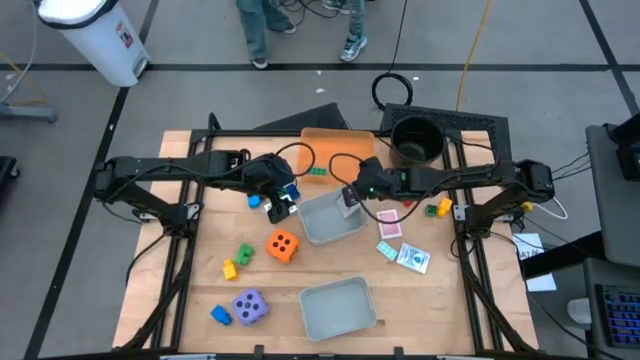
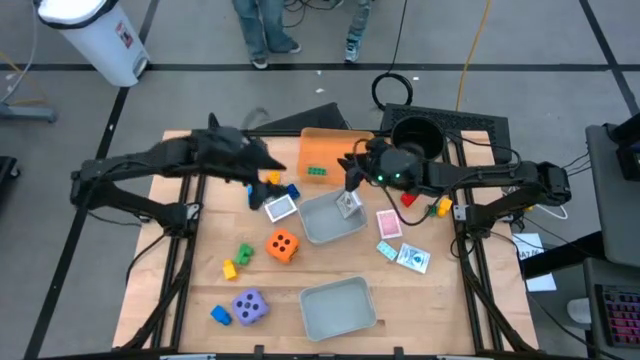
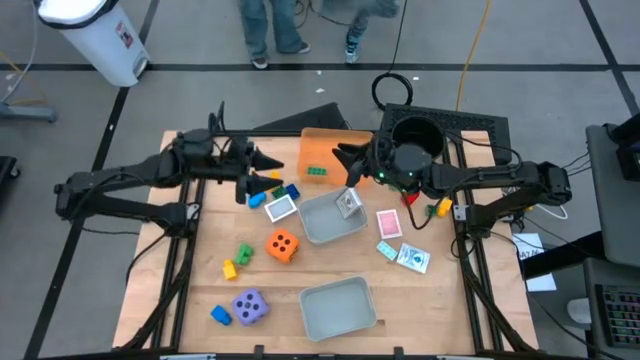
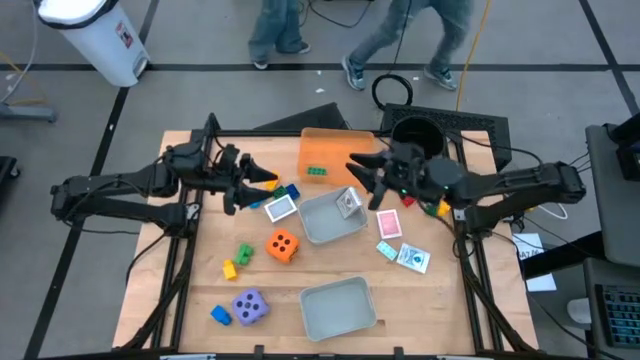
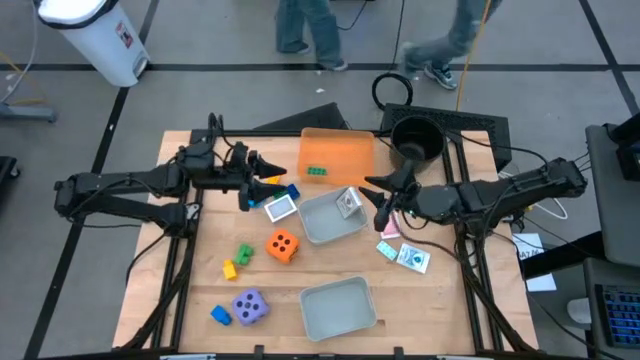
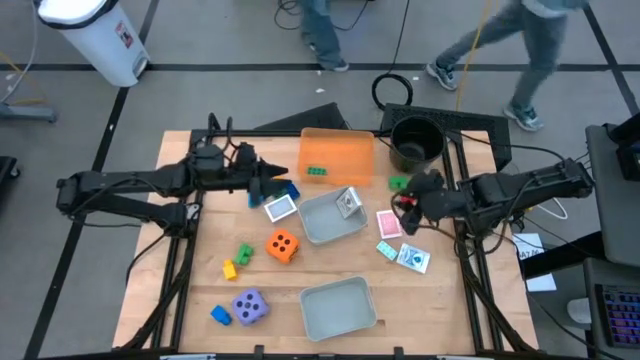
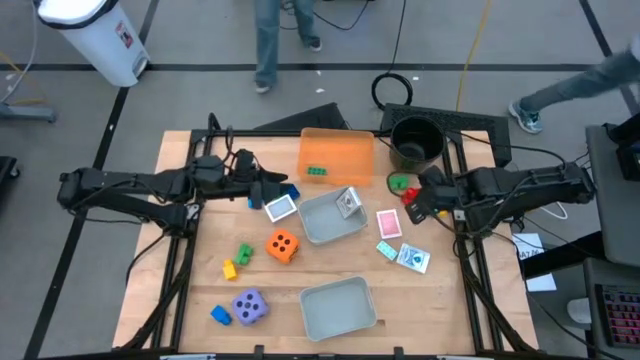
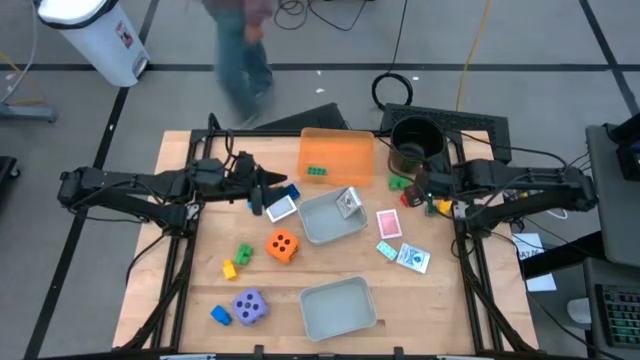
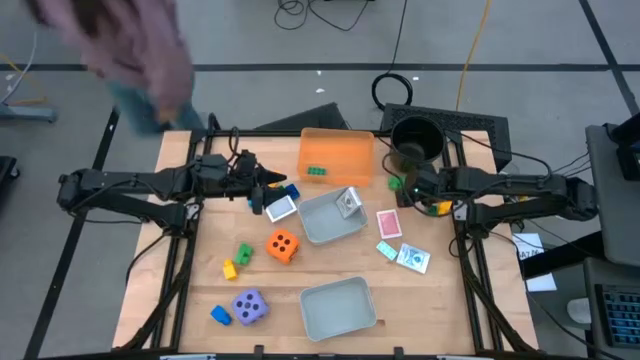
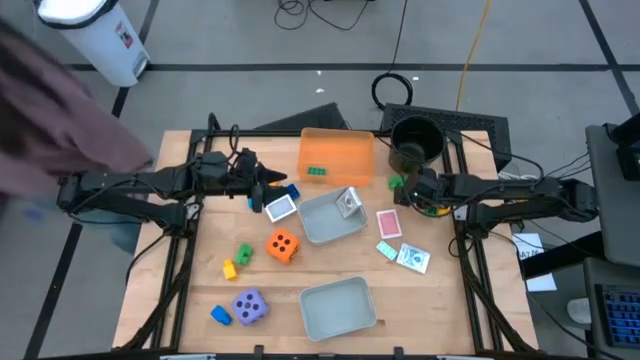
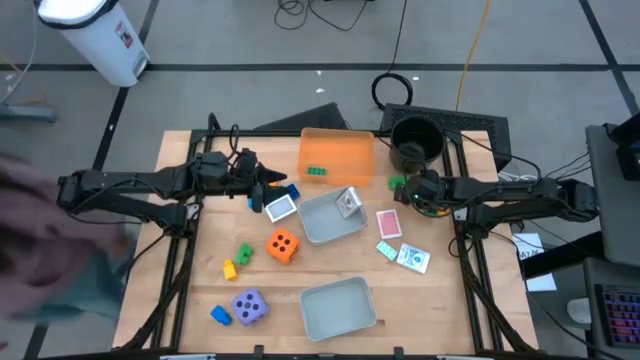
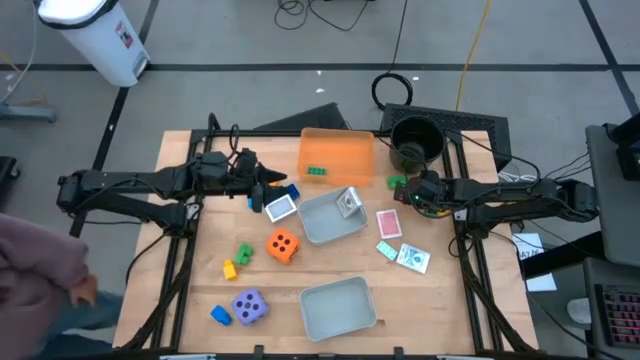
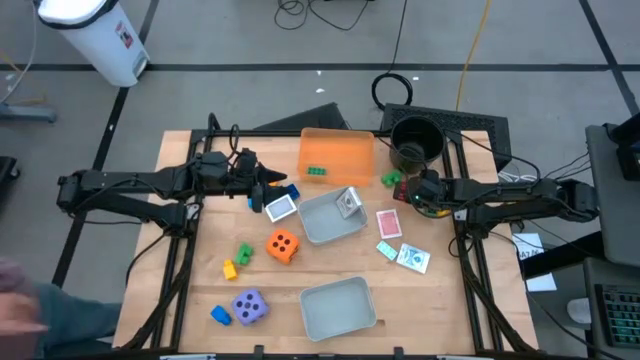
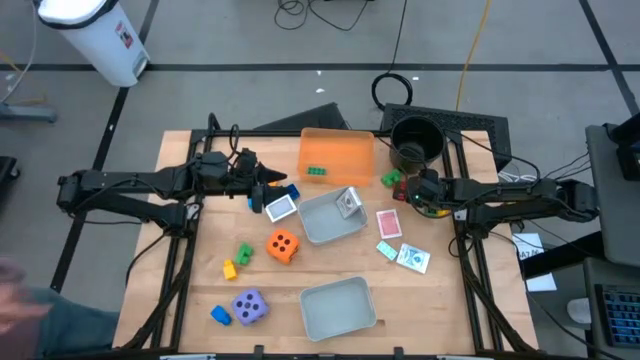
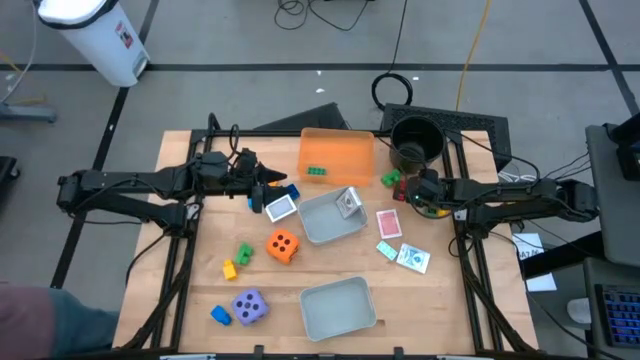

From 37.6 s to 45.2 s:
Task: Pick & Place Toys
Put the red game piece into the orange bin

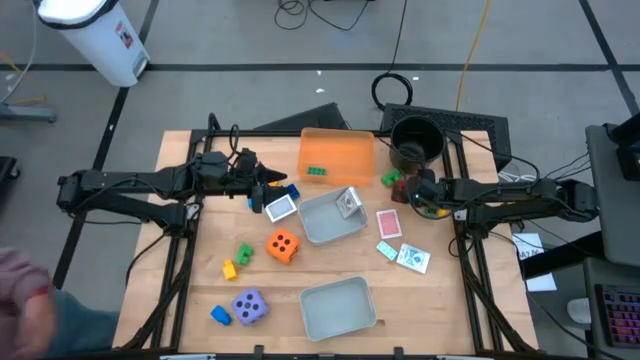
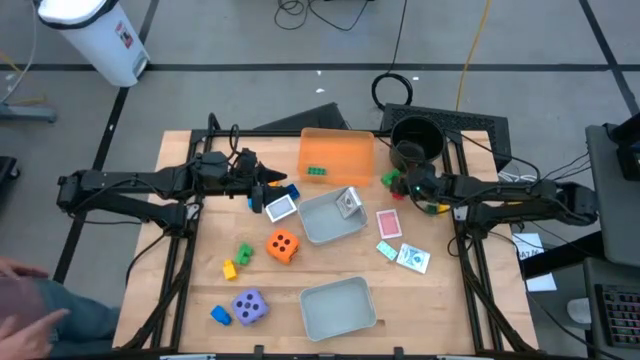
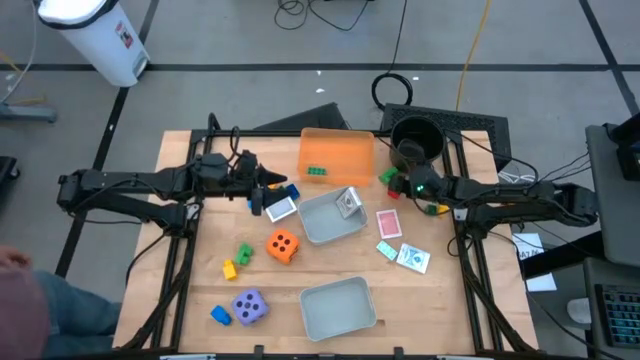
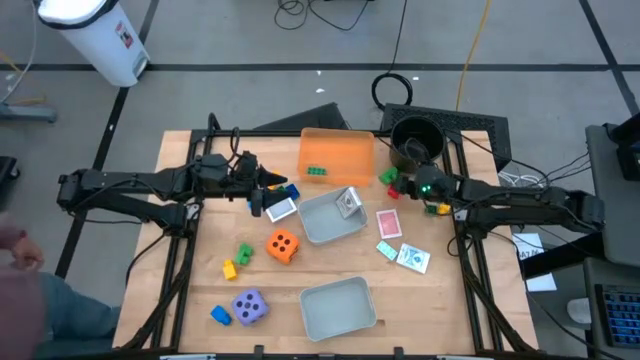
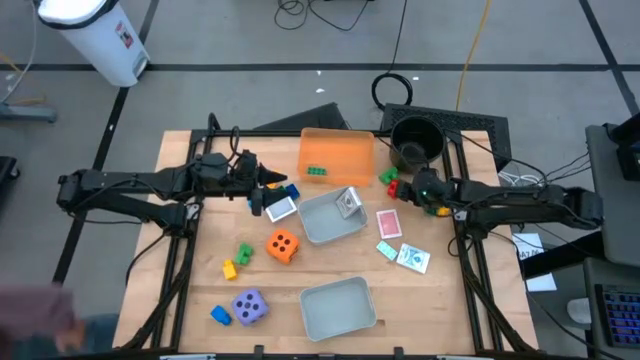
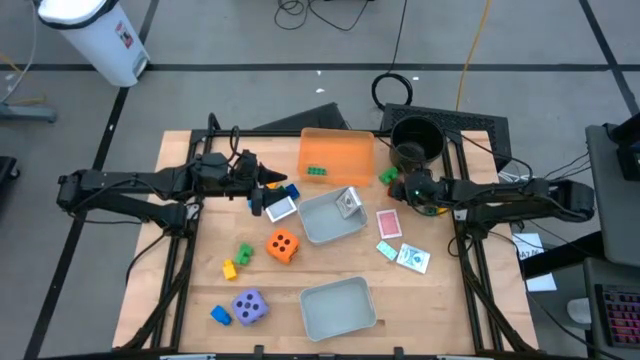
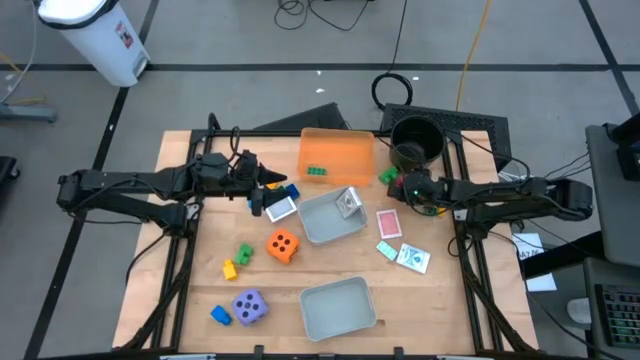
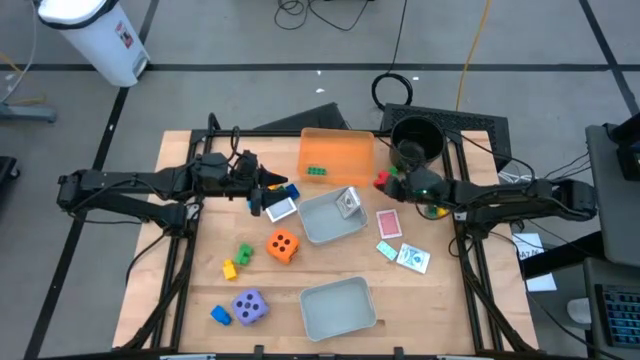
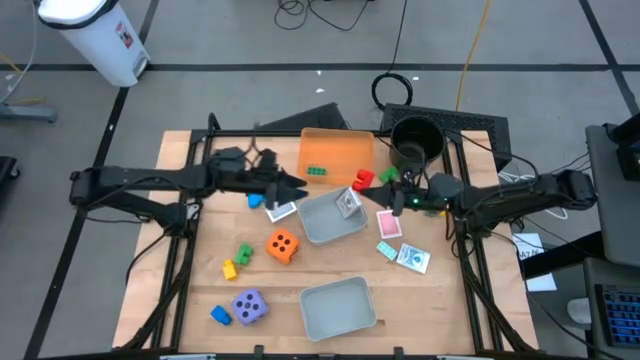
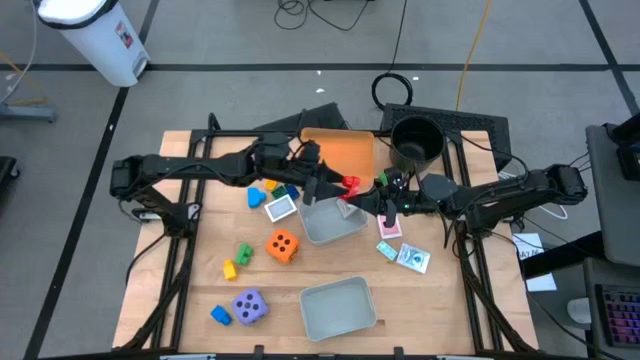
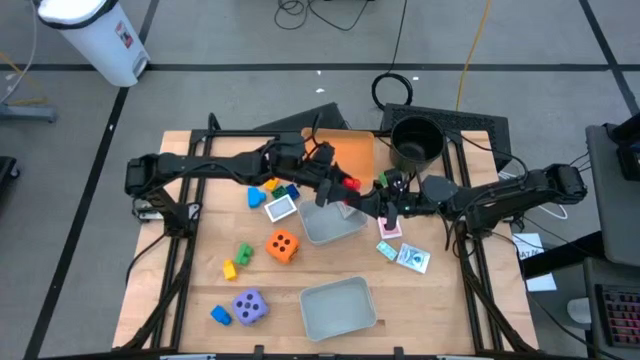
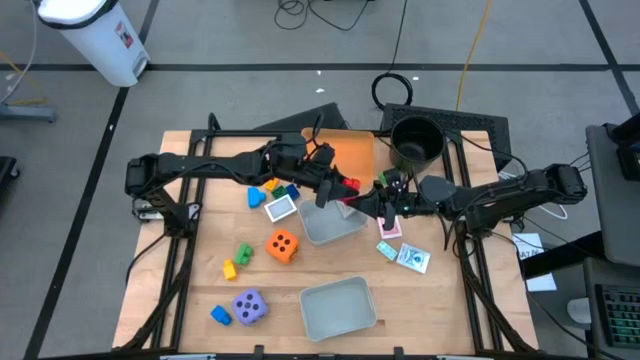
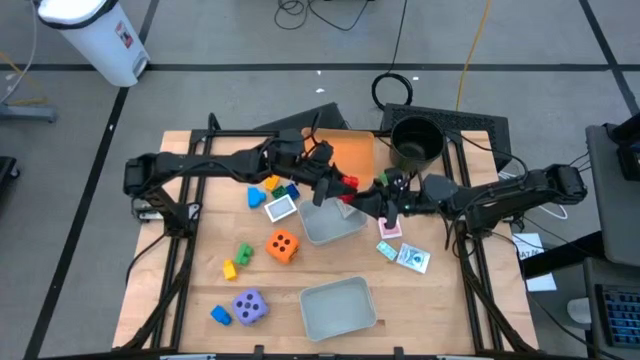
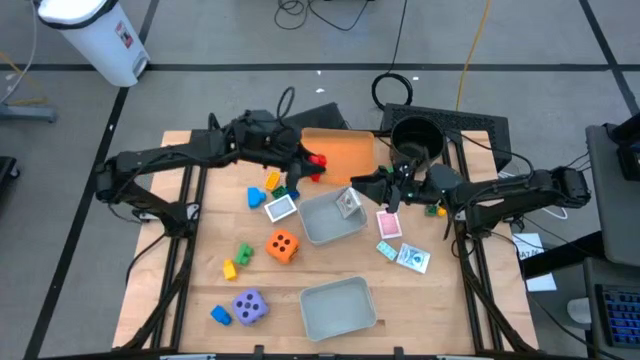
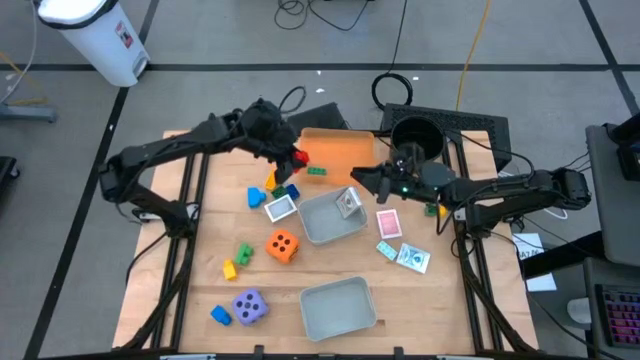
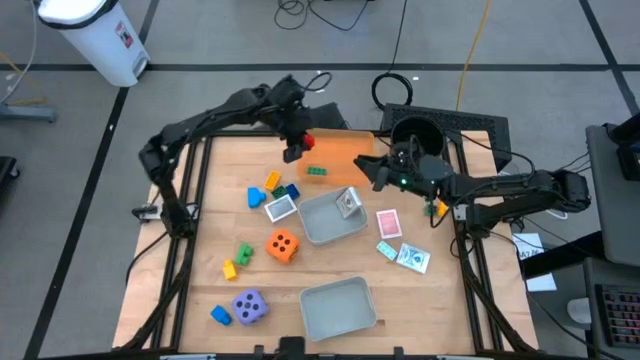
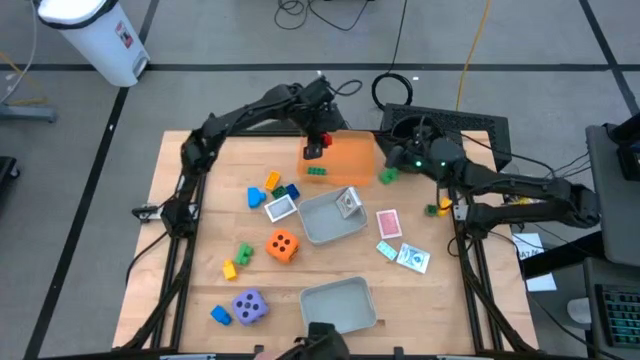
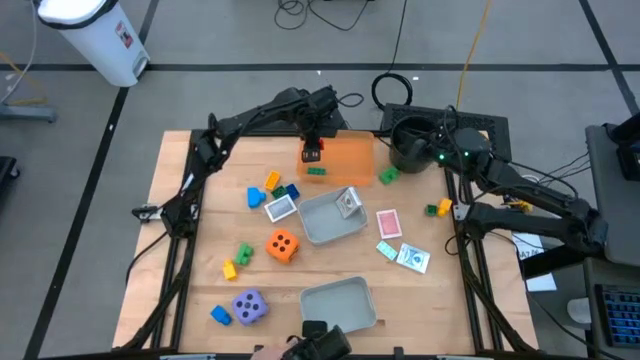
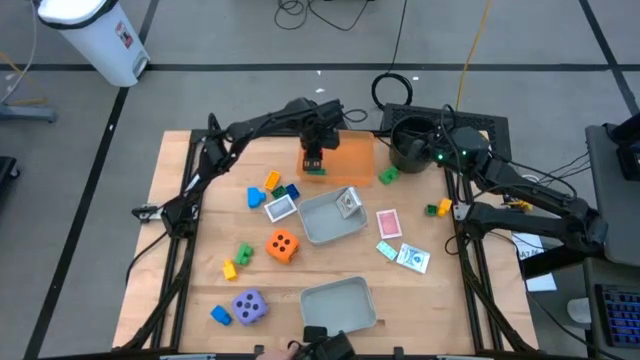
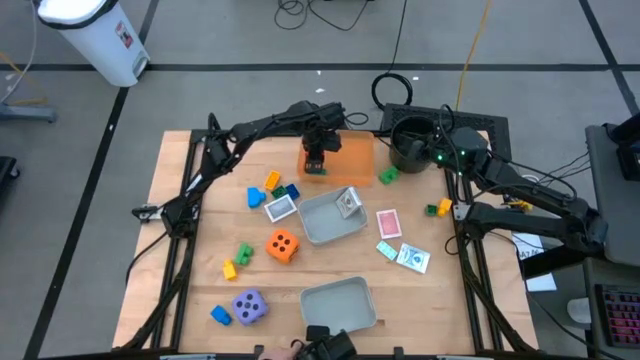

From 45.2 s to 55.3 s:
Put the red game piece into the orange bin

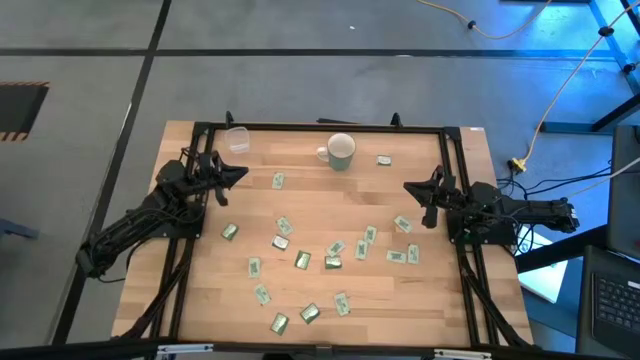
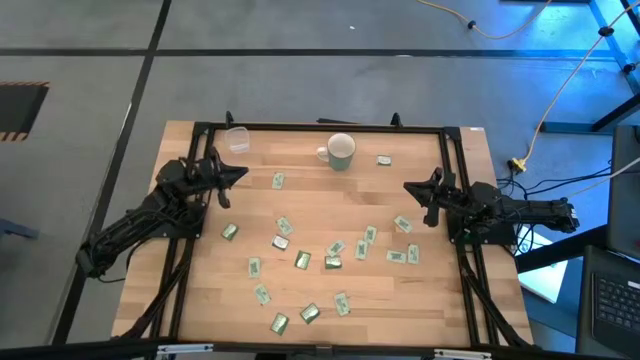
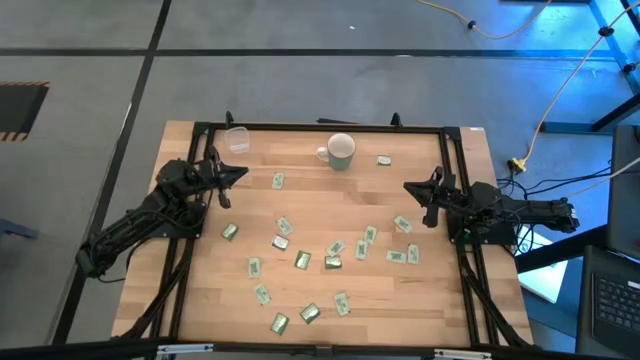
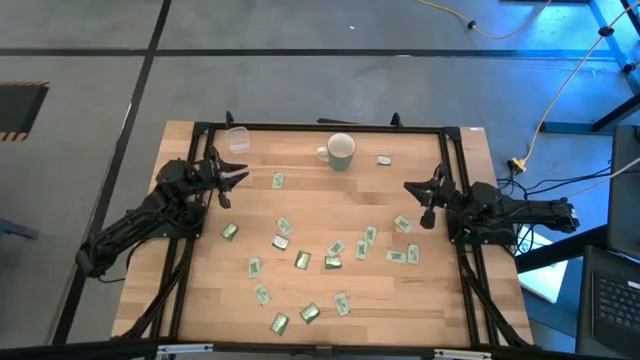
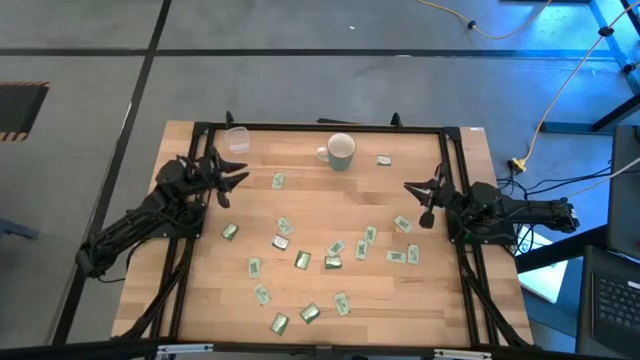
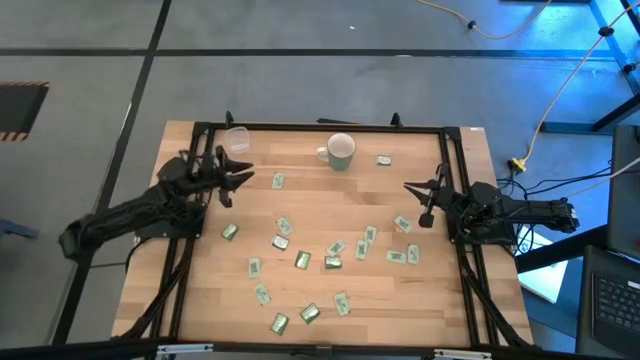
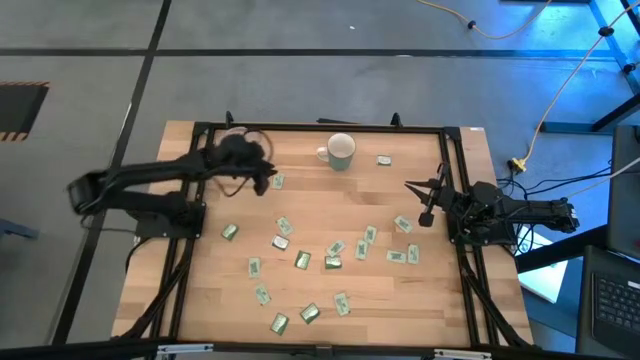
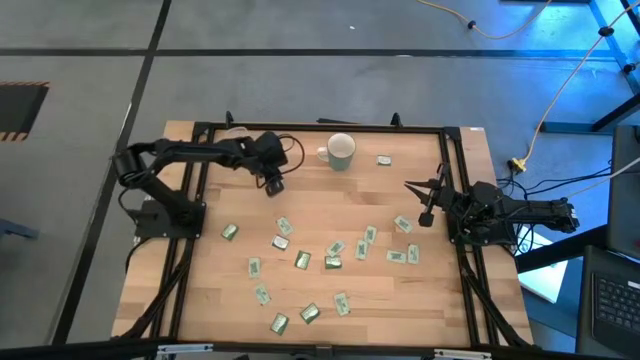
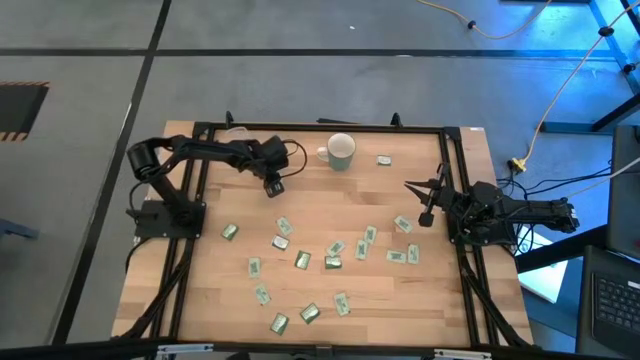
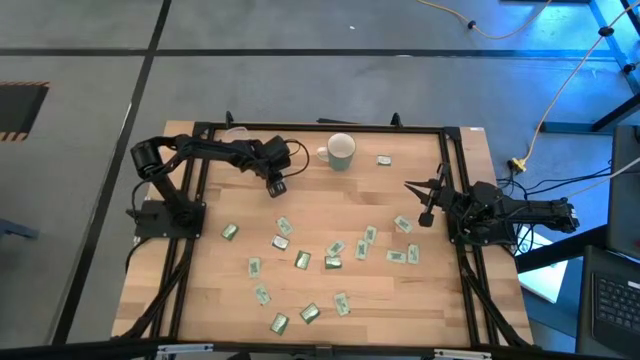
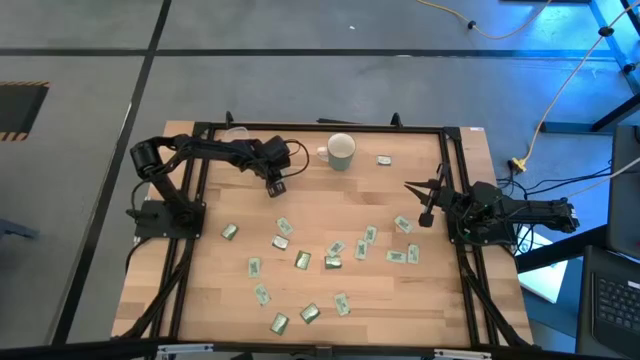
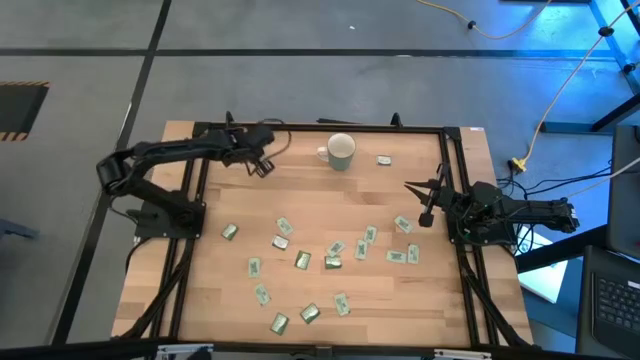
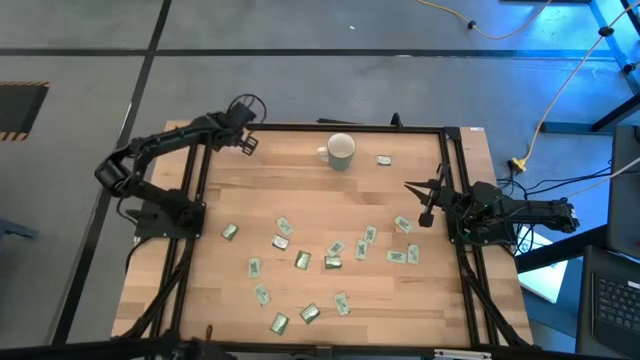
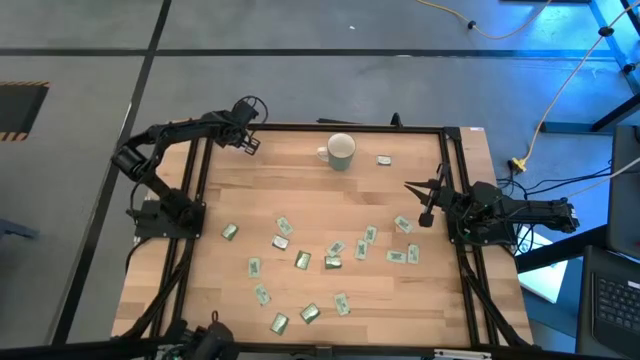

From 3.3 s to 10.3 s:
Task: Pick and place Stevia / Truvia into bins
Put the stevia packet into the transparent bin
